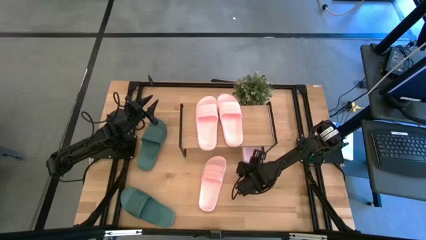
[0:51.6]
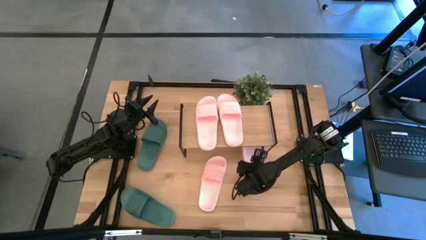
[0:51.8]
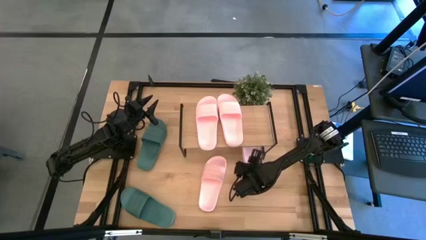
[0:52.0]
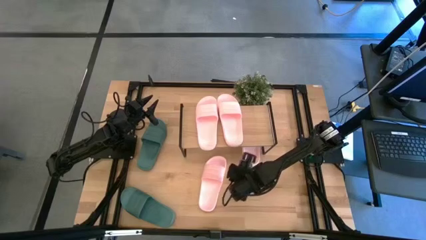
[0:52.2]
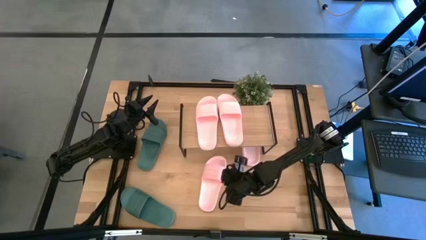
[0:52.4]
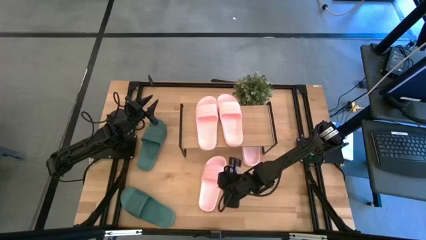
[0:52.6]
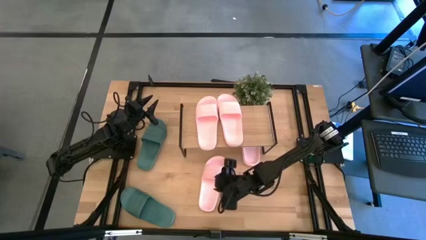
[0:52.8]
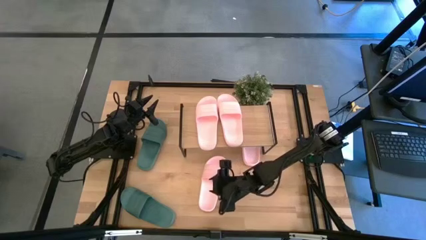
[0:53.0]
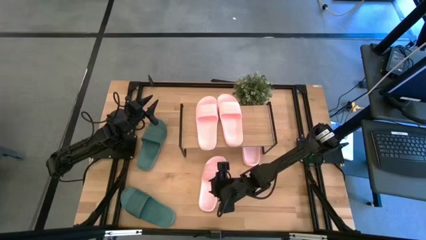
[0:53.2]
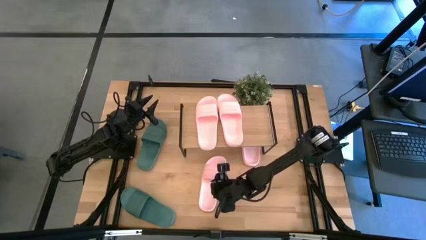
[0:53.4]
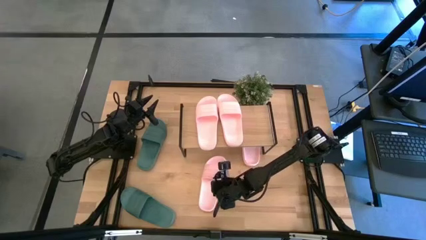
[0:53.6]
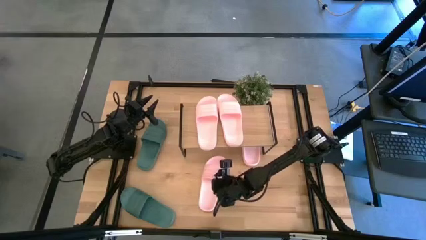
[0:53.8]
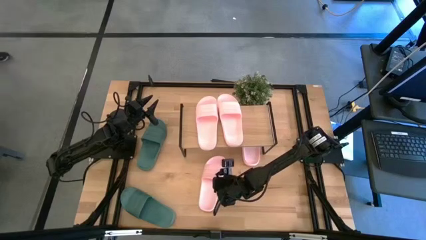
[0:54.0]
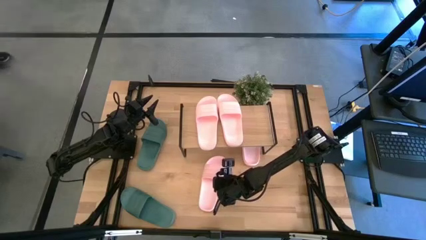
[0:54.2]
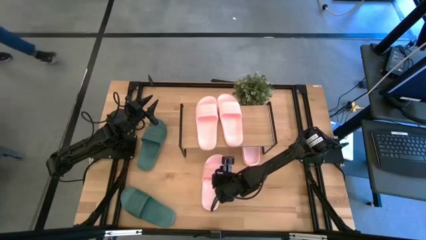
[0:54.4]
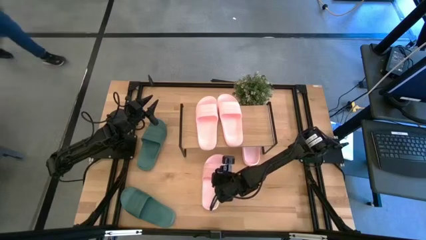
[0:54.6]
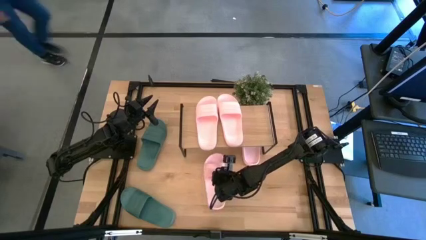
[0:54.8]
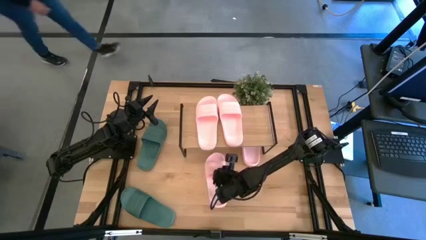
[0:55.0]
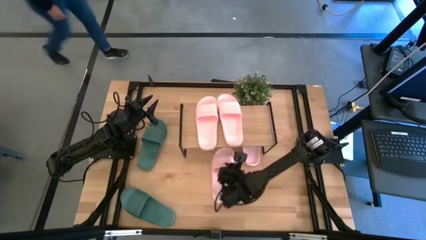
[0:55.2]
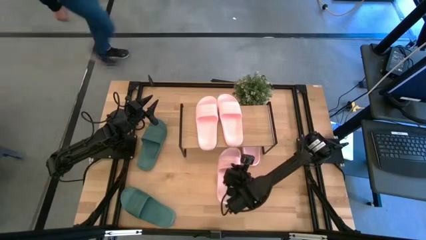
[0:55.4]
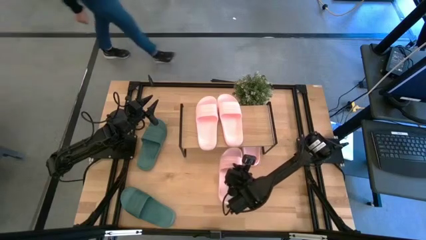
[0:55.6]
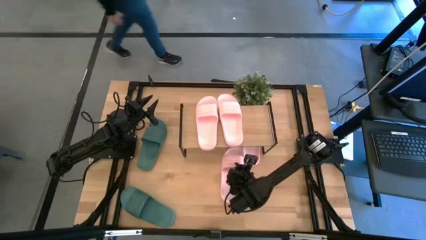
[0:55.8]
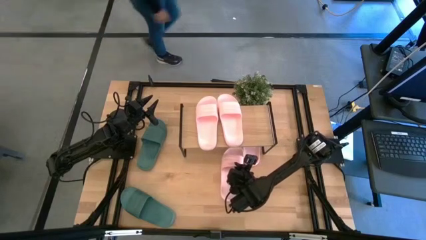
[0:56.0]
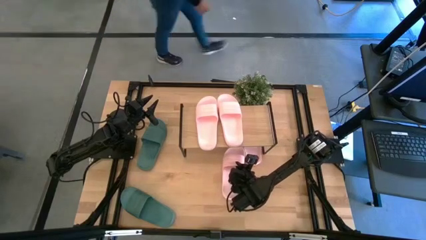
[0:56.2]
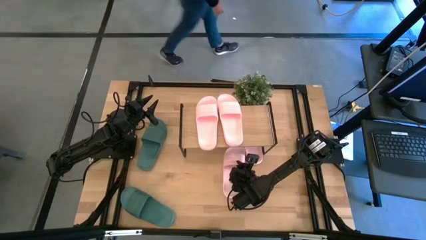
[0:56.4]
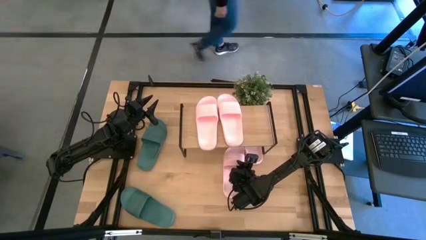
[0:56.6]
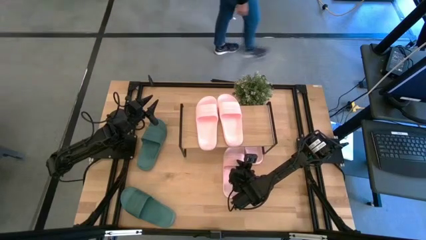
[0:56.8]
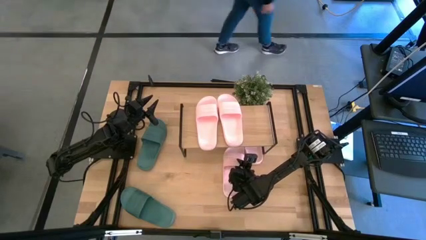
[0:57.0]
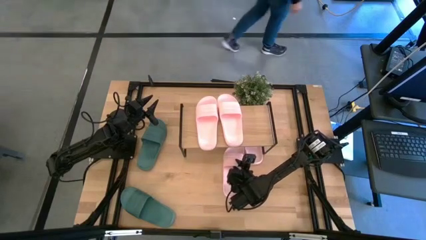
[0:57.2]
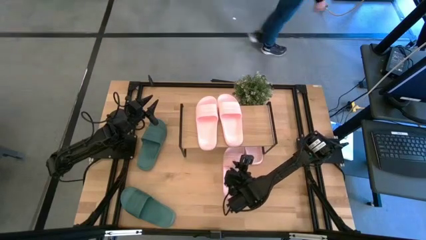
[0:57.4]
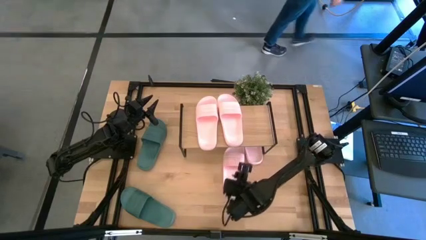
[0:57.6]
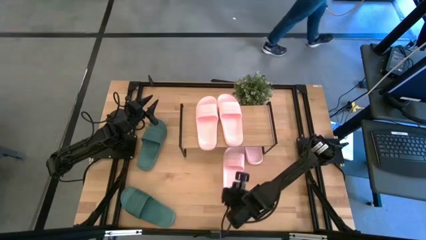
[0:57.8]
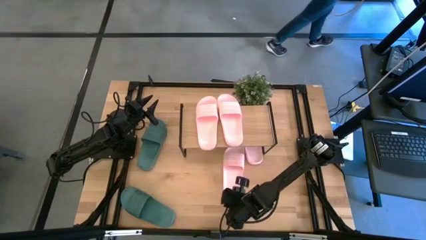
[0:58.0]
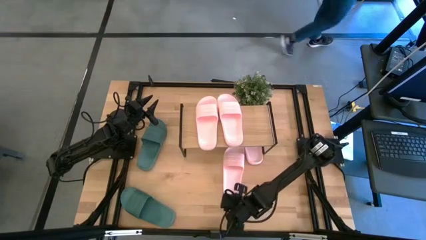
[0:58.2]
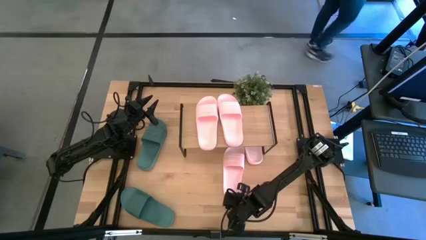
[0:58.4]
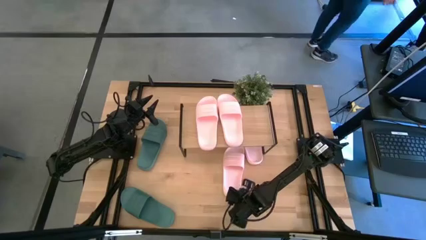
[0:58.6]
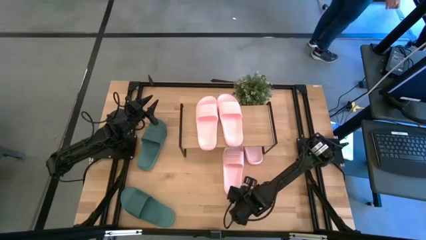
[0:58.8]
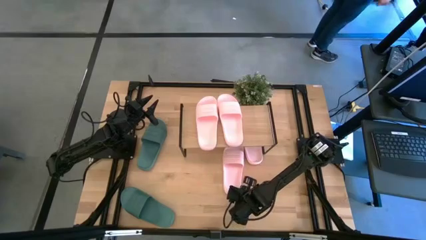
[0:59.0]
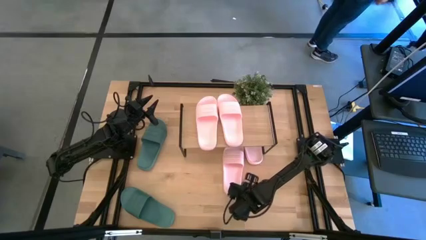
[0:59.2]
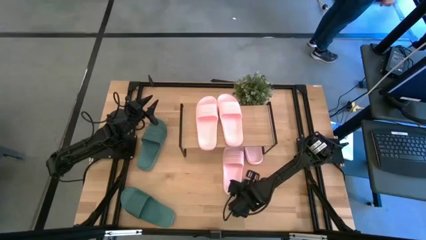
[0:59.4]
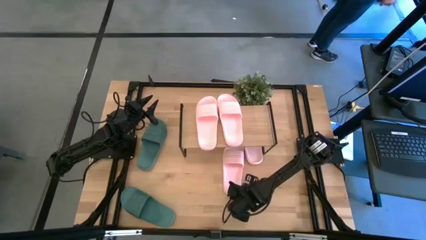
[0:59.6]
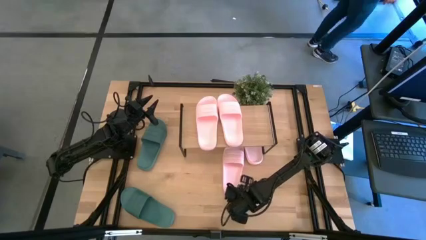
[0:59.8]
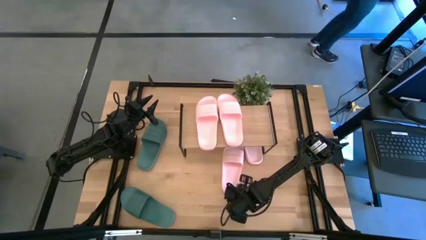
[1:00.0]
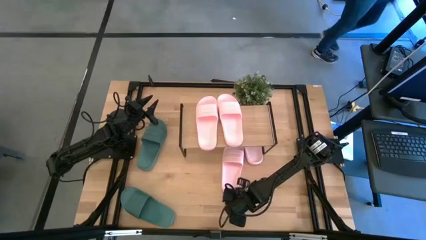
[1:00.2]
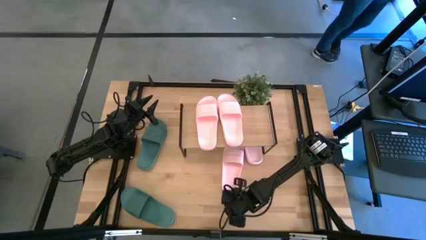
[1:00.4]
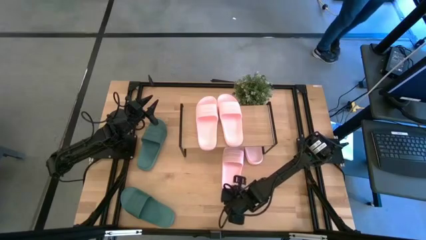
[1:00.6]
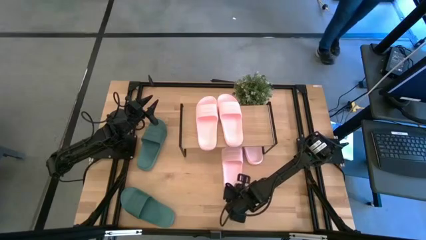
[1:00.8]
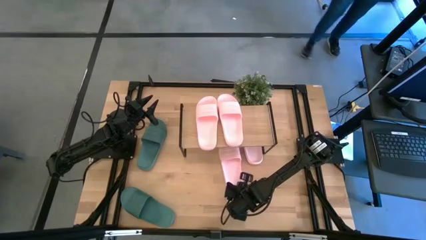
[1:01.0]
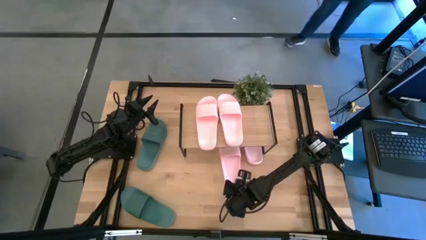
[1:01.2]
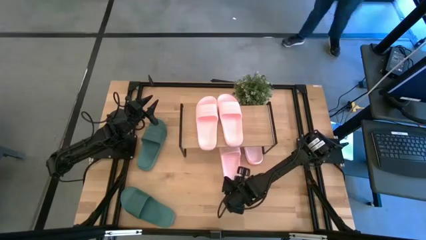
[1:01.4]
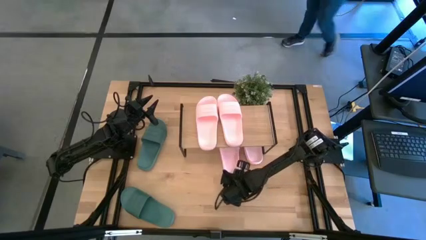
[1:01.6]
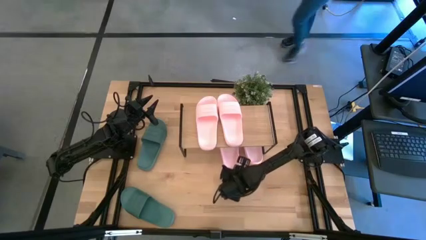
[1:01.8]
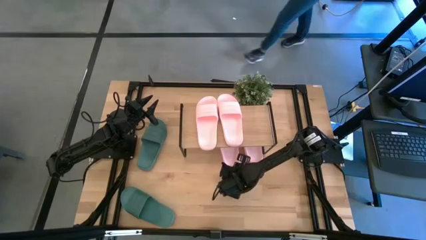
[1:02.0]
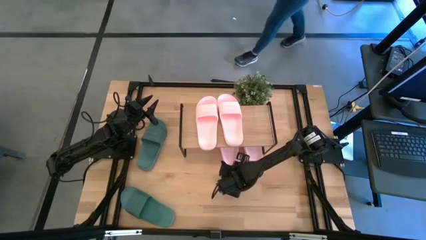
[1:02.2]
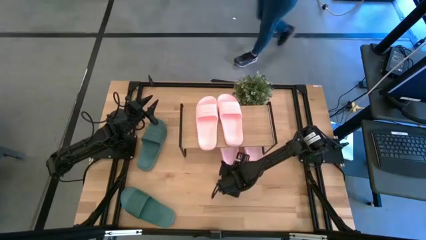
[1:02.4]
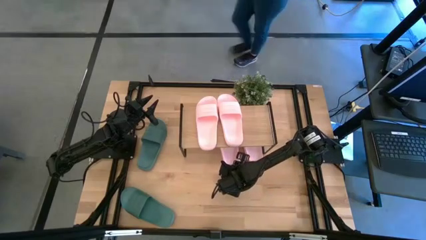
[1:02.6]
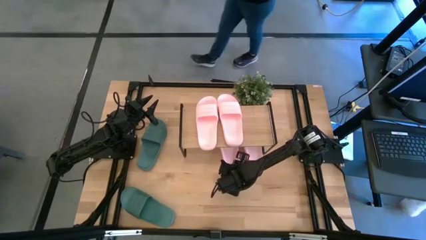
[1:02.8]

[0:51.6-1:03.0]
Task: Pick and place slides into the shelf
Put the pink slide under the shelf

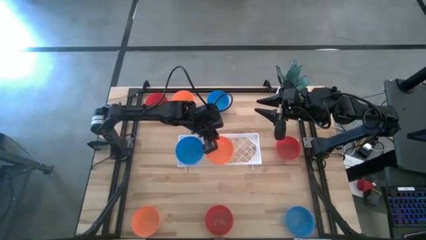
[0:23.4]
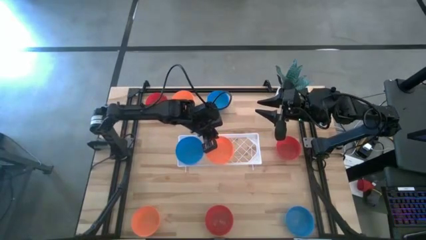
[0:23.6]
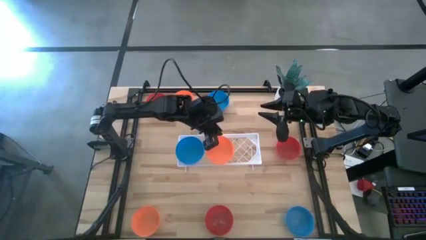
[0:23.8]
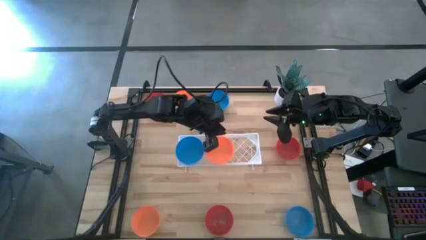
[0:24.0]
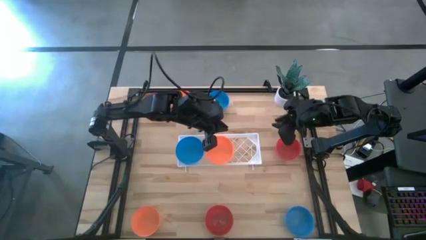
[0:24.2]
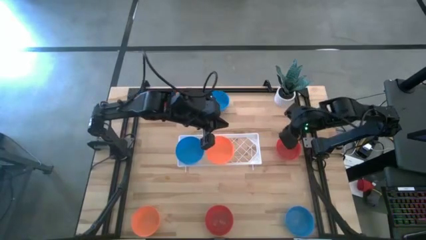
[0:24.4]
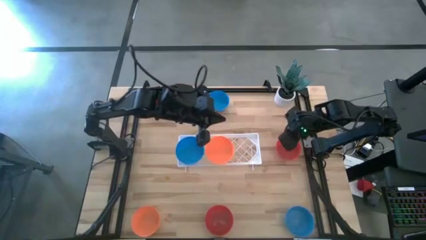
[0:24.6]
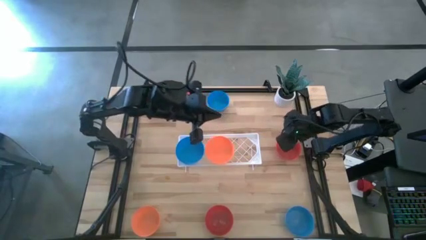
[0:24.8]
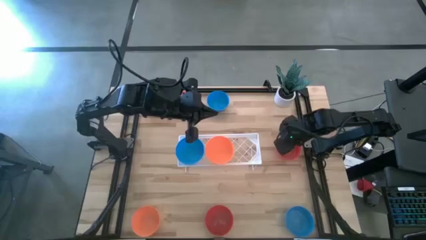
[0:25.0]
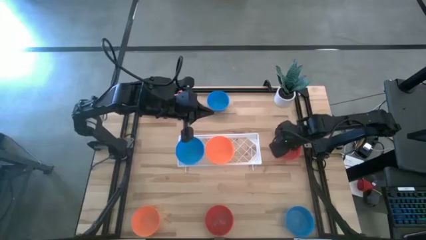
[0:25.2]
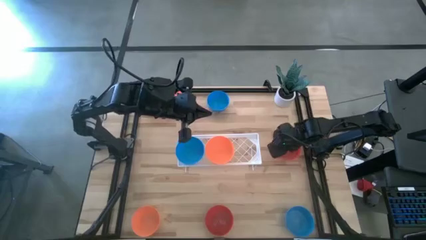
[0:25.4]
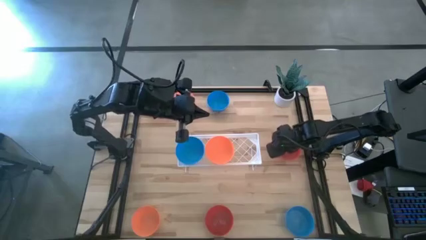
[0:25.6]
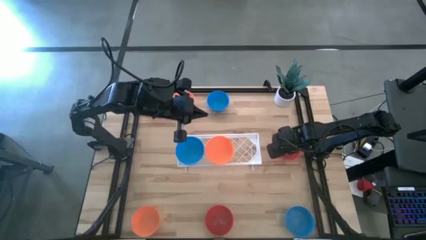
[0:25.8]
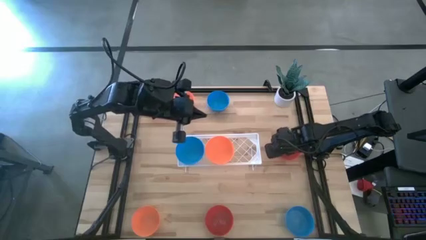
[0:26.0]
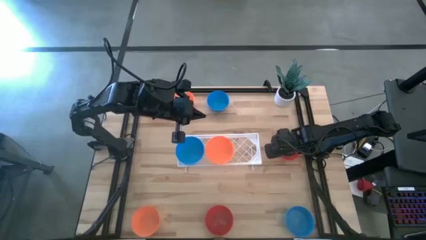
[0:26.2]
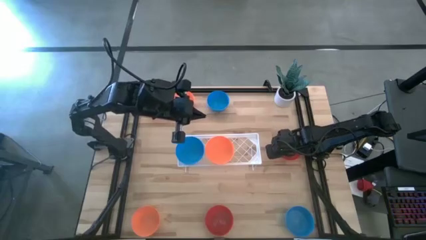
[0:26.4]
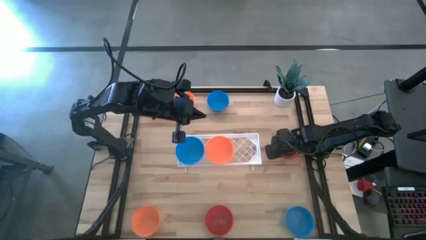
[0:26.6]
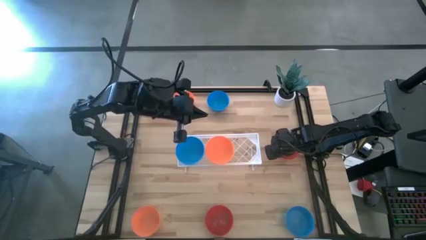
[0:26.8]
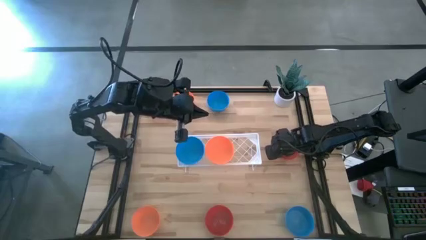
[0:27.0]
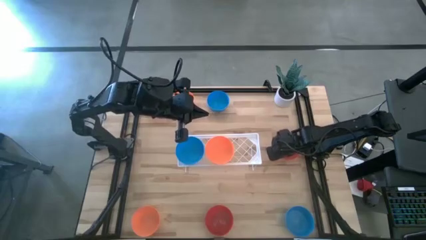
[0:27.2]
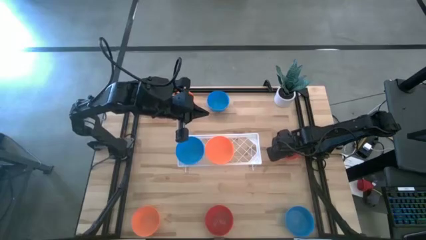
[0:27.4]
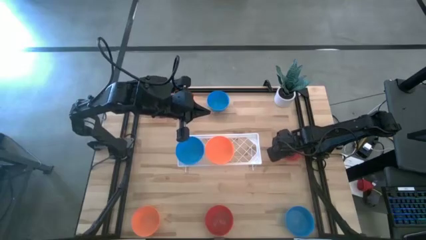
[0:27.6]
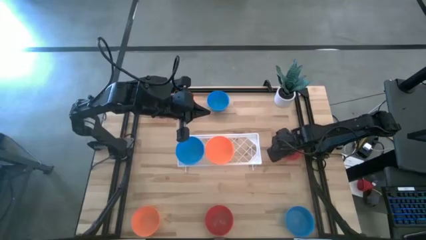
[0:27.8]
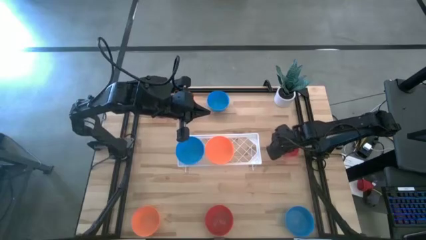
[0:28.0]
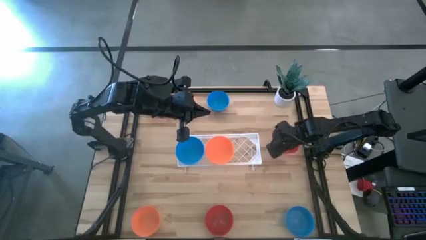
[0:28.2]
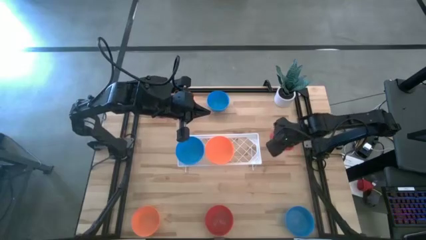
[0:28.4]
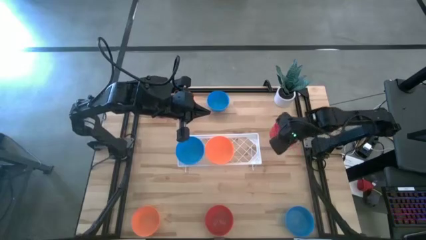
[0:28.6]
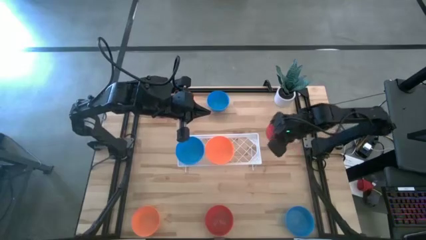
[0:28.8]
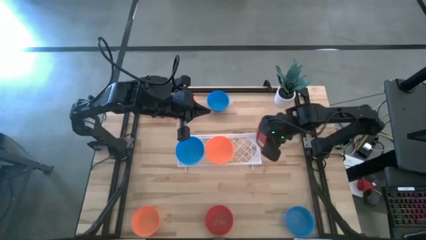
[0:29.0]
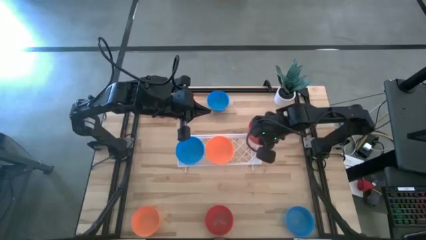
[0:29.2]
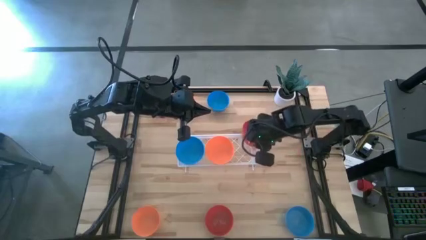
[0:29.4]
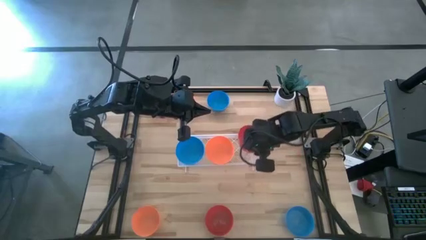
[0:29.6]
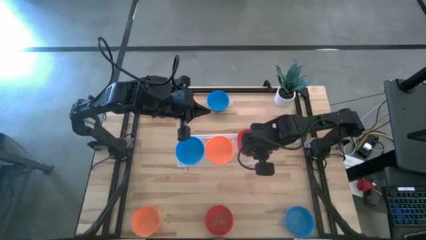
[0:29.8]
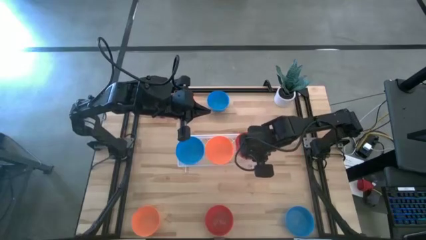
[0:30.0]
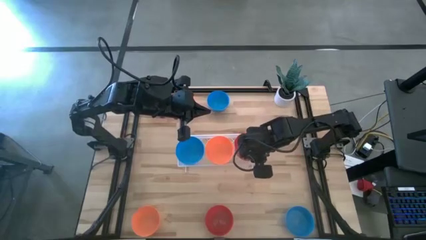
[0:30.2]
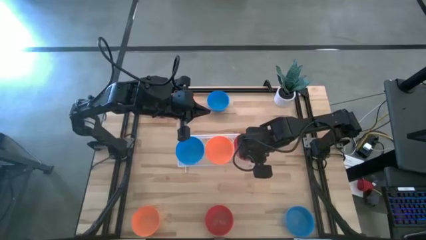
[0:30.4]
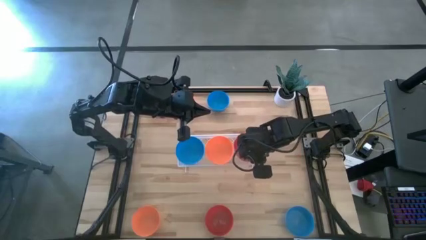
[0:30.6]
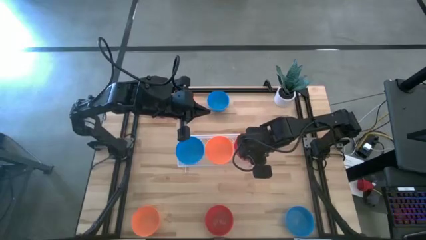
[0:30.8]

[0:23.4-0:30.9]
Task: Pick & Place Mini bowls
Put the middle red bowl on the shelf
